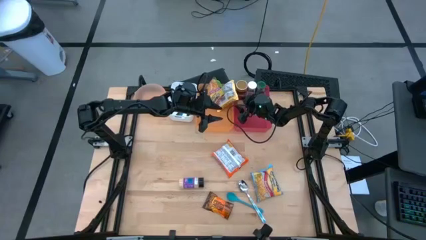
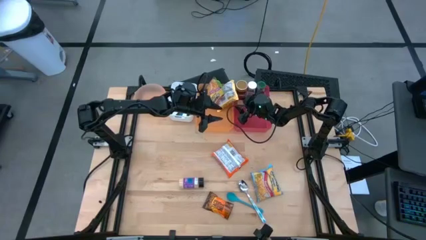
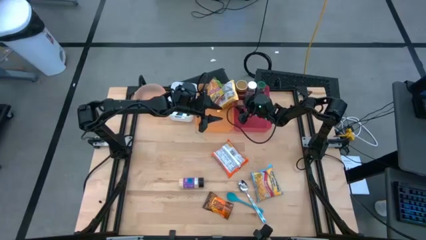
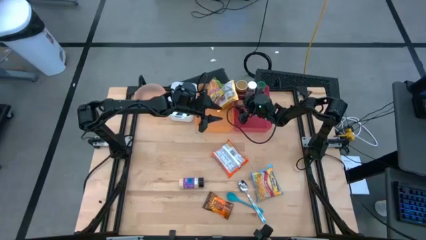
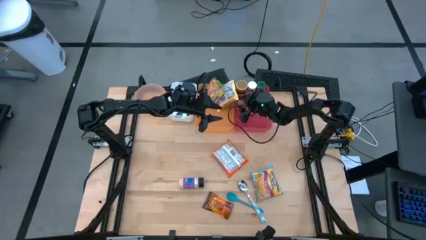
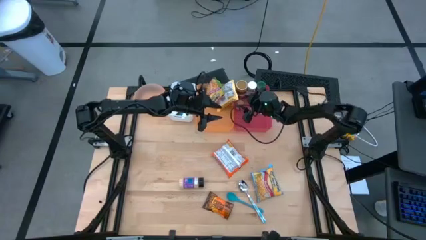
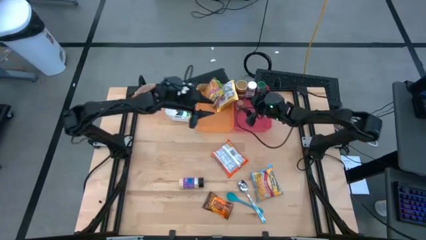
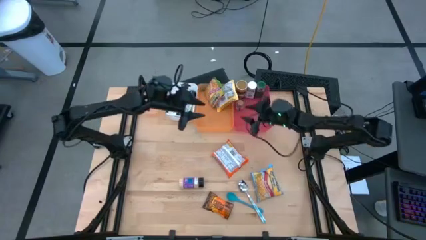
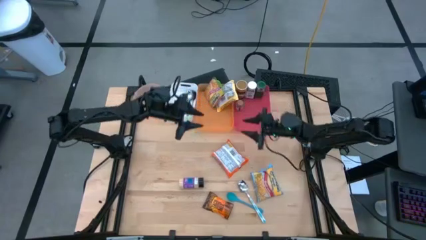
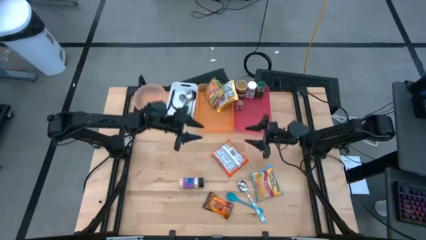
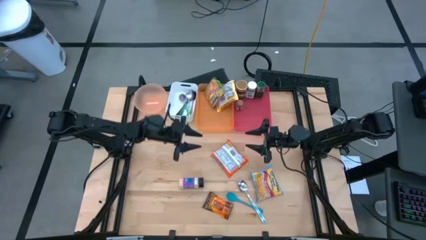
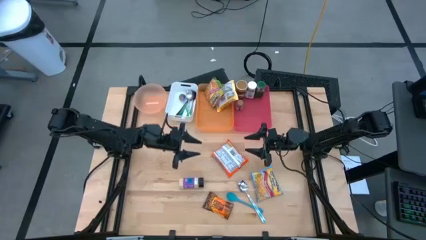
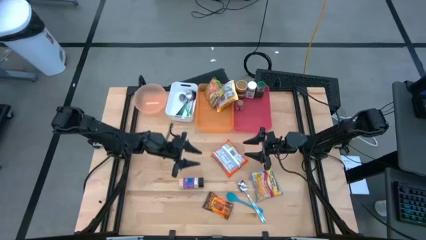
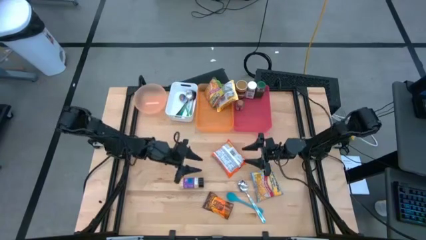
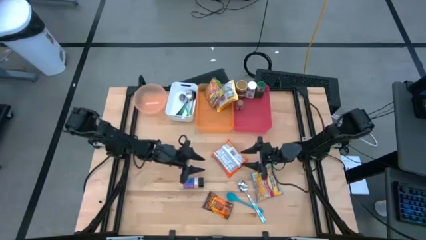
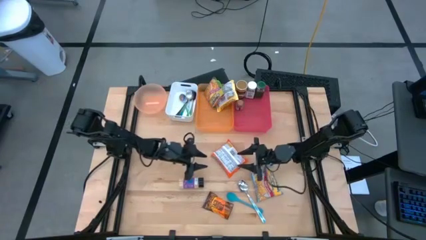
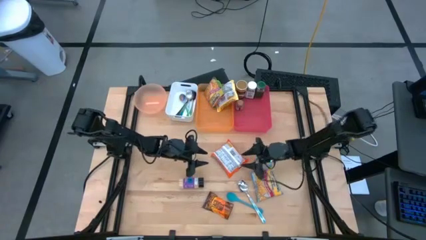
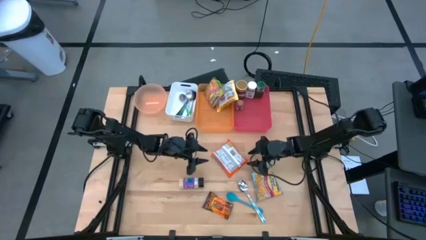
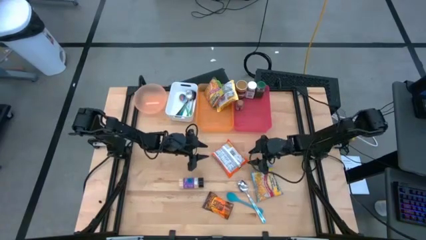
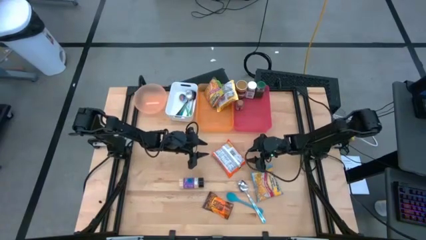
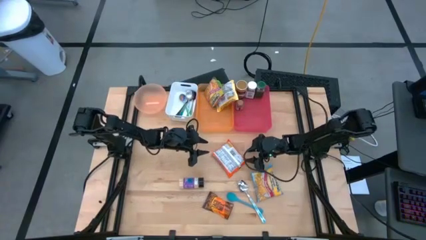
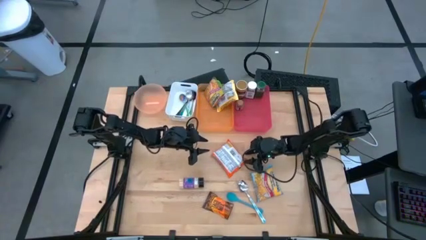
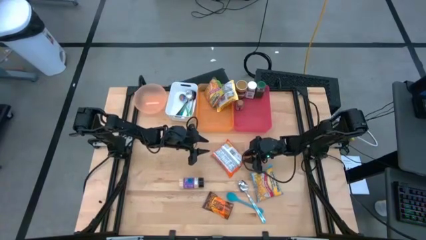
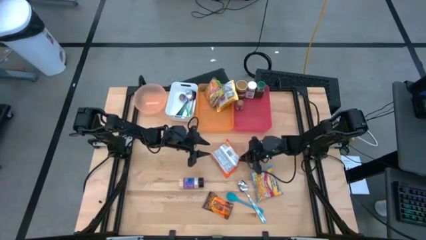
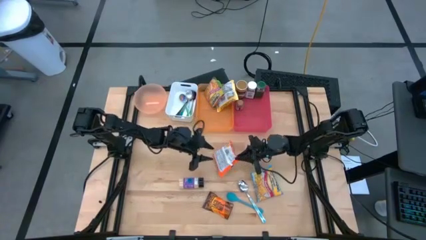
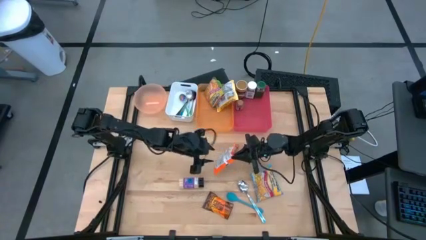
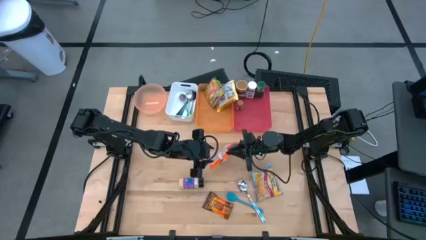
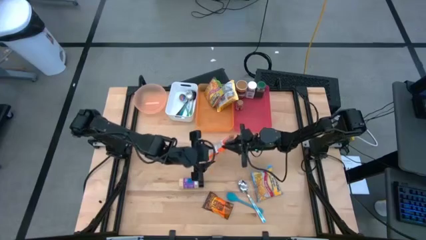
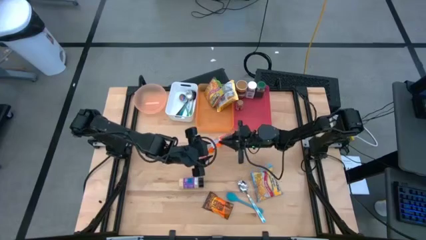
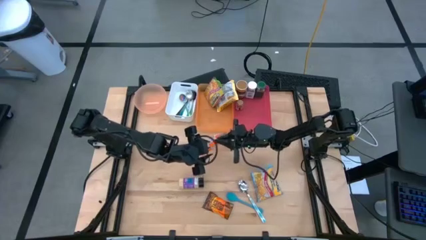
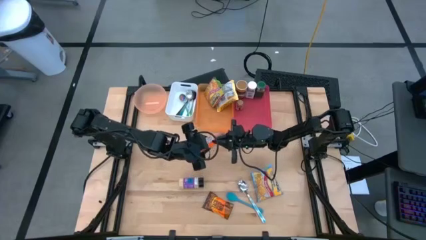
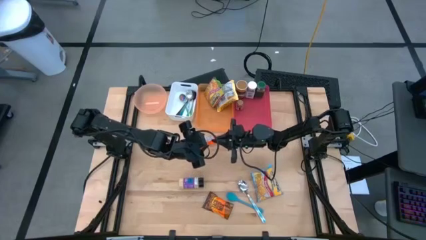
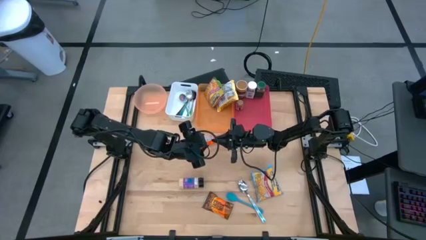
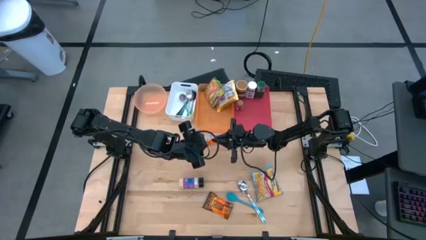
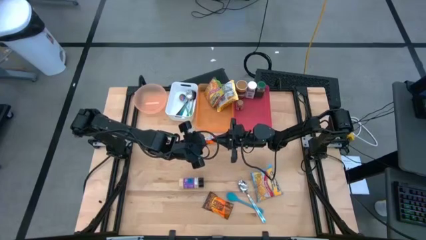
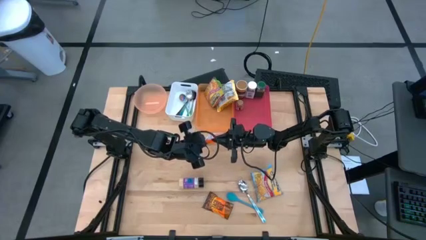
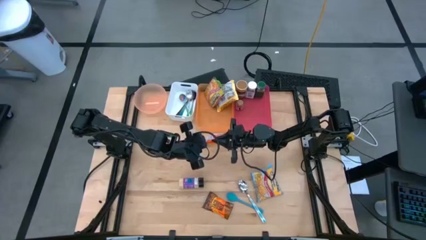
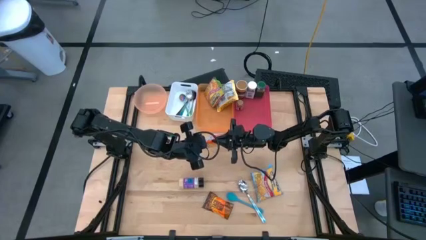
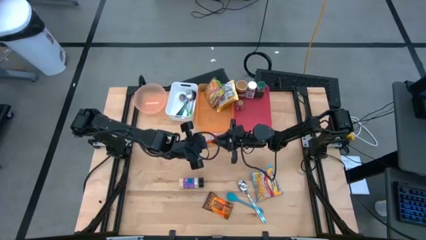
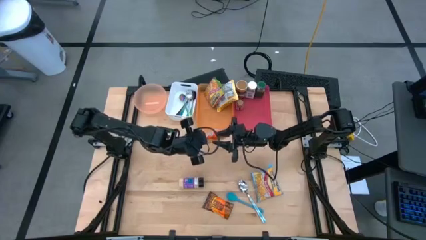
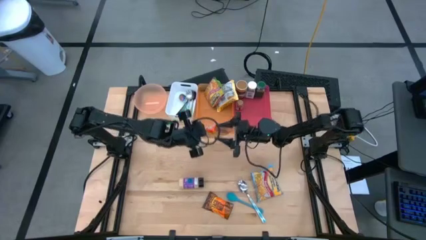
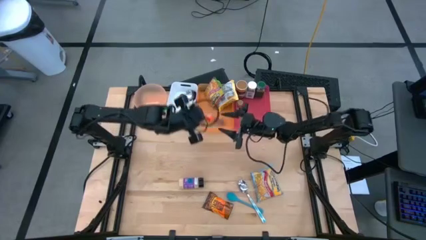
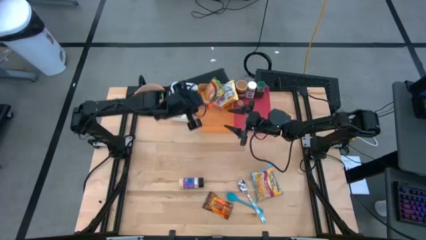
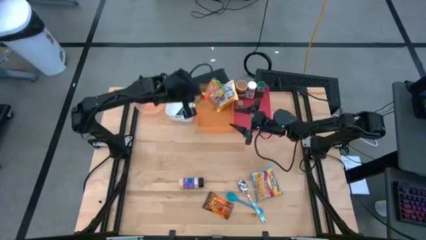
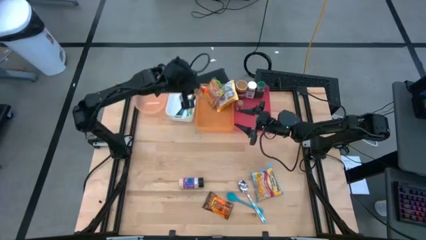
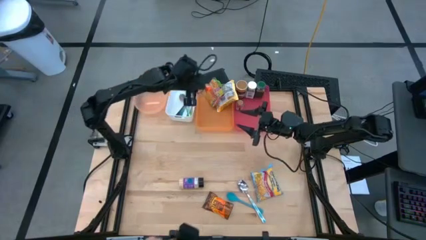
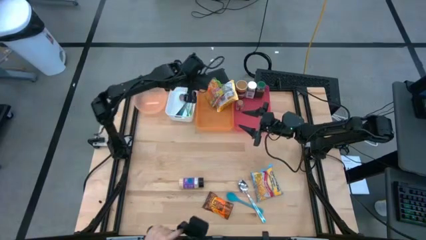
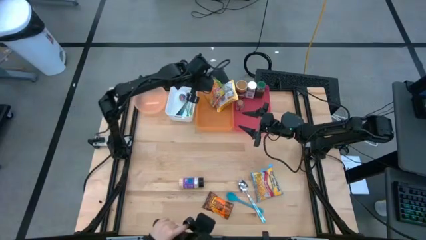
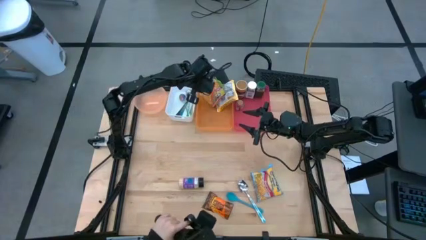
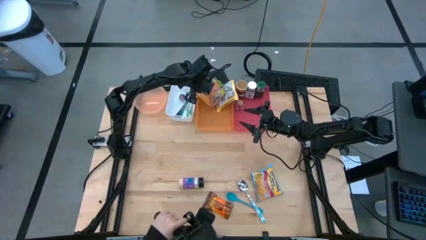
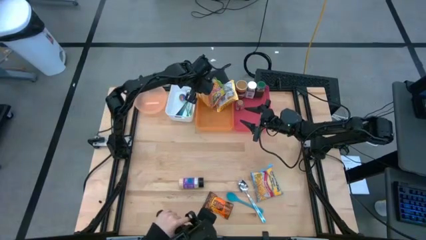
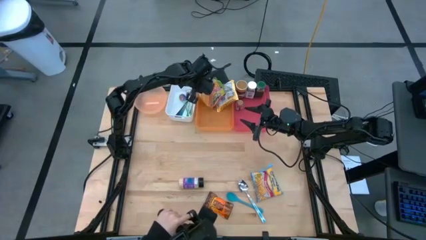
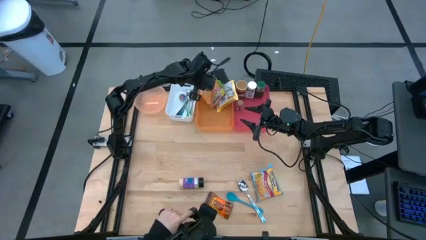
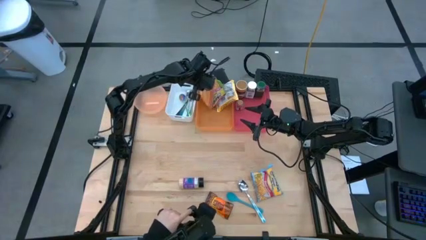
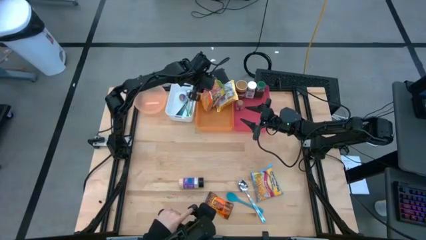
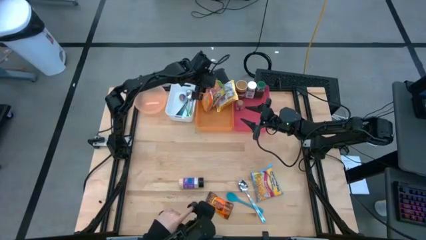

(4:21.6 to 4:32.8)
Task: Pick & Place Food Item
Put the orange noodle pack into the orange bin

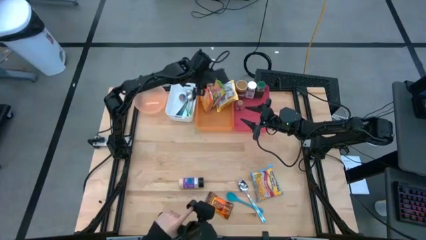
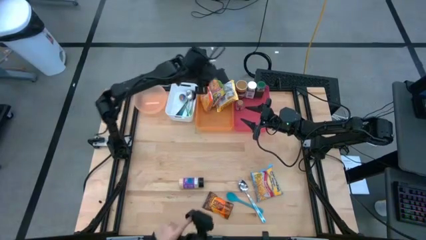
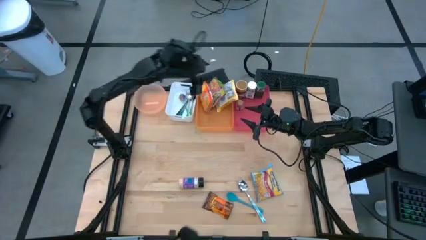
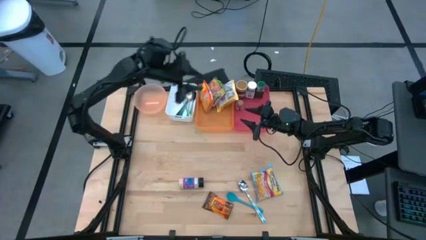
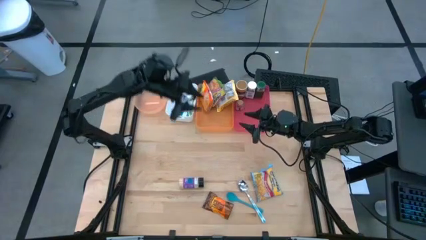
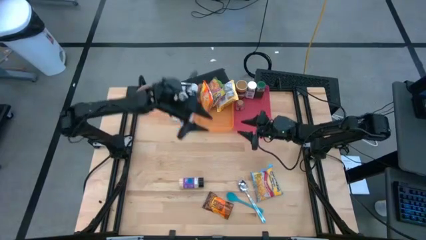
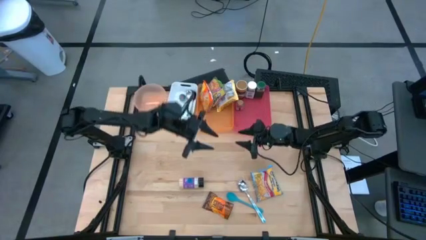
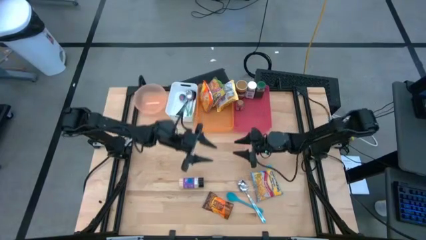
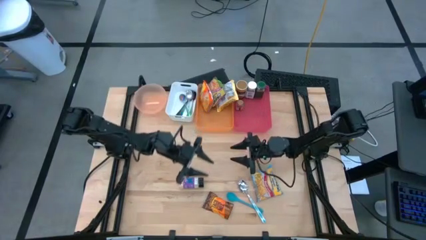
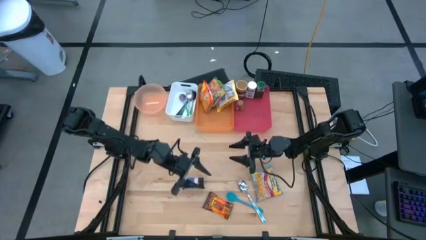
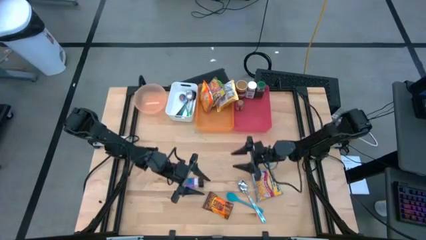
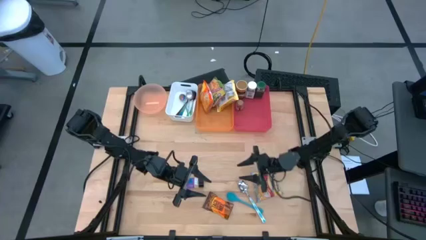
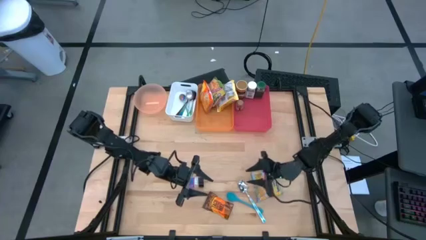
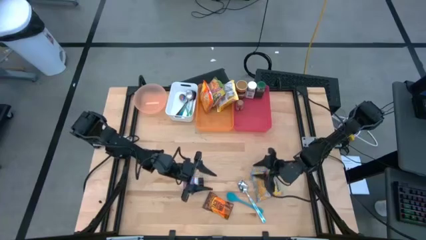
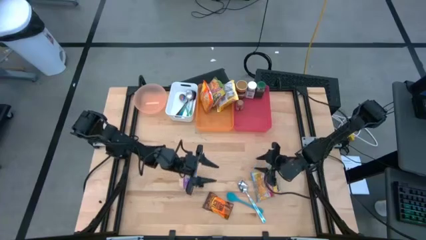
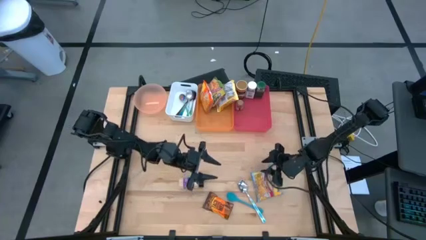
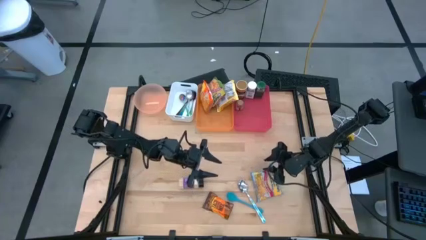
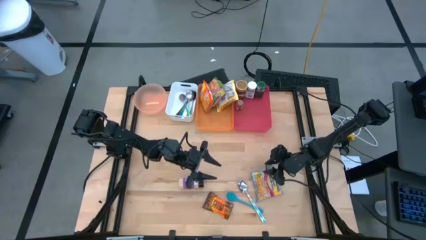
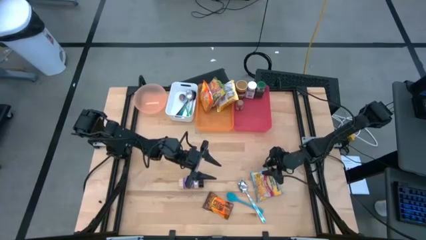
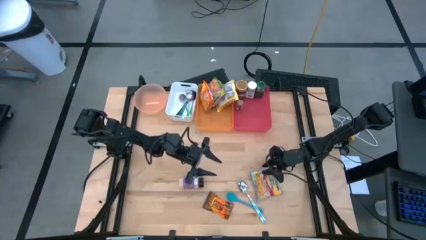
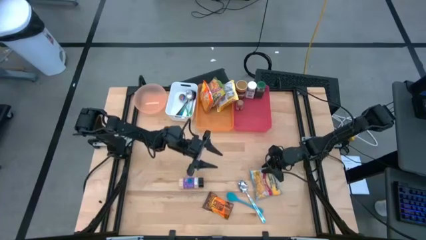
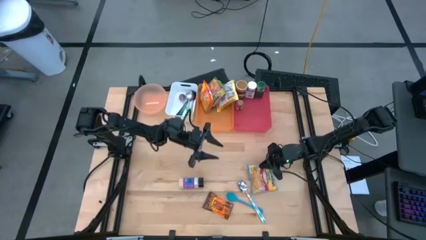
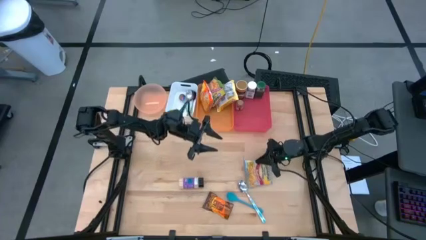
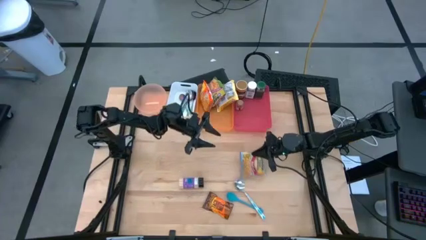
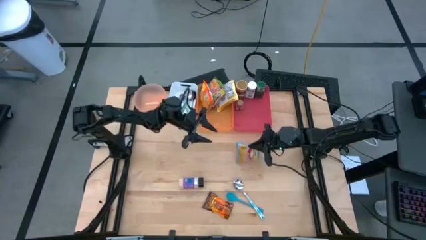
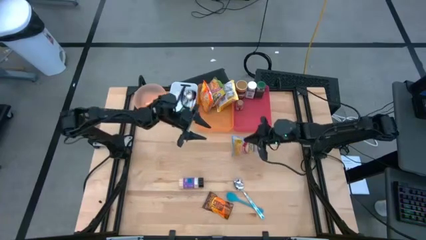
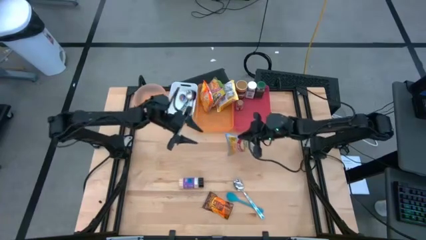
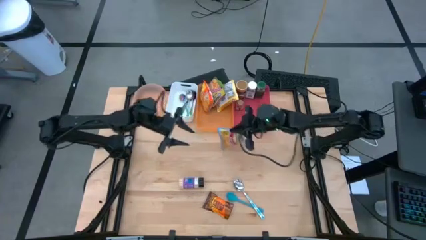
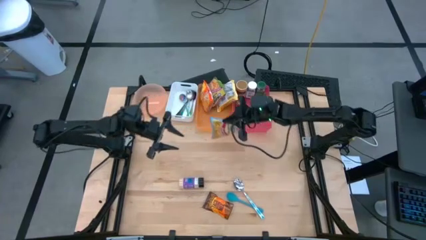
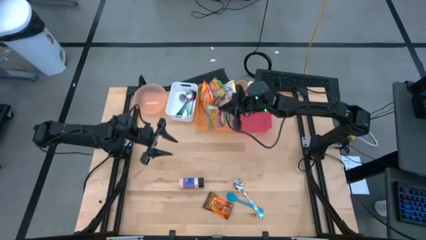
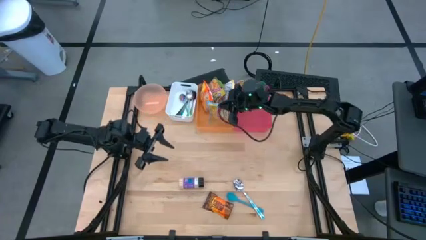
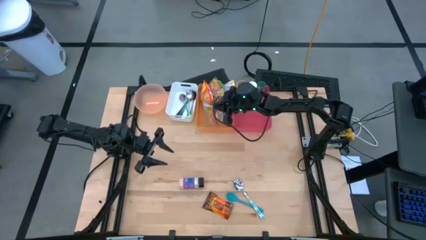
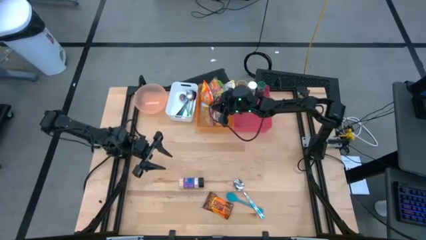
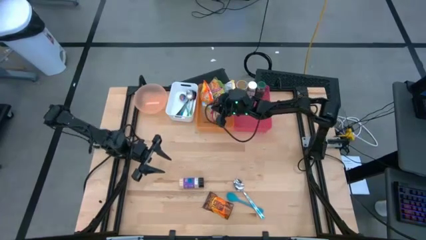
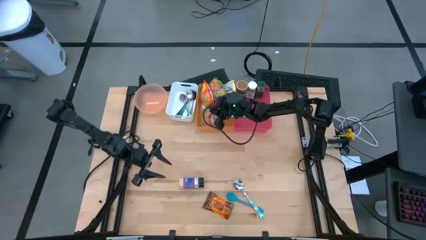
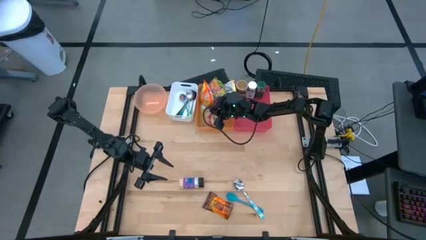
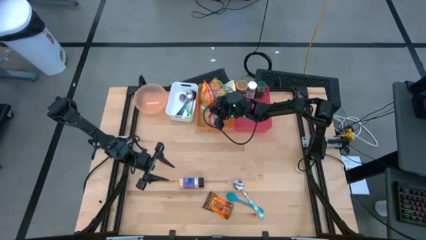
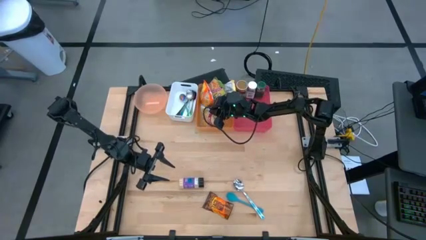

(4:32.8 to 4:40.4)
Put the blue noodle pack into the orange bin
